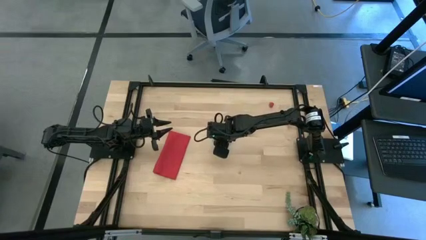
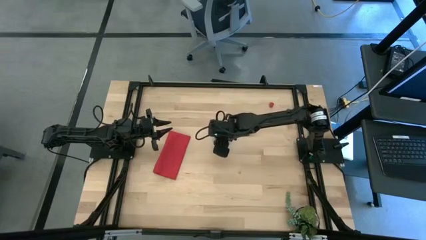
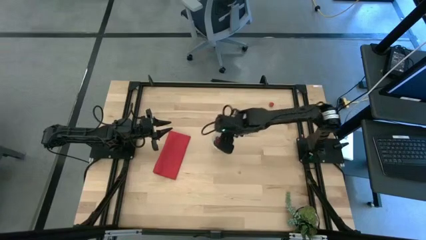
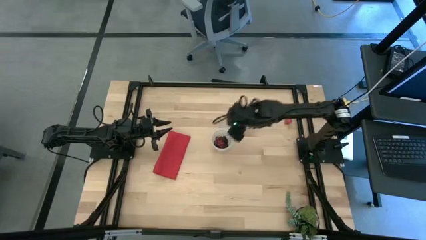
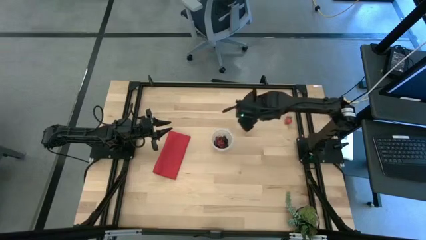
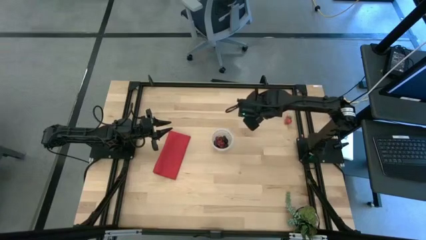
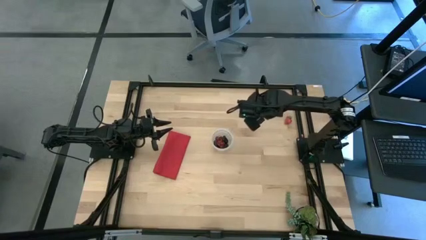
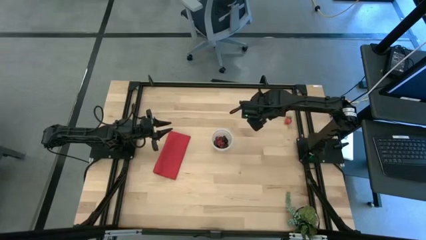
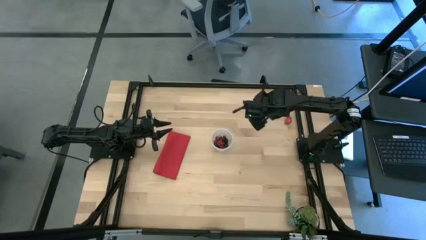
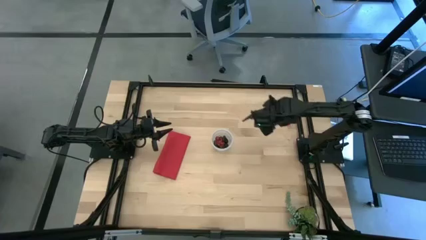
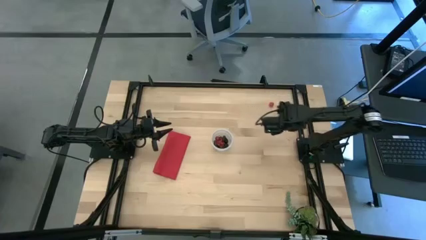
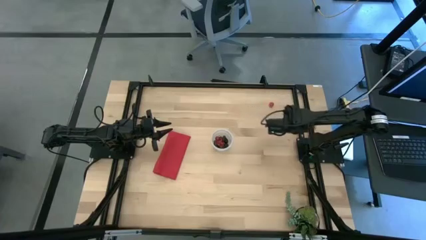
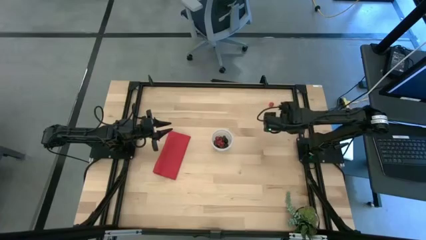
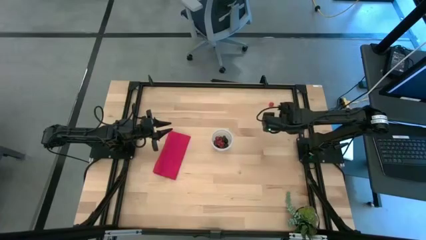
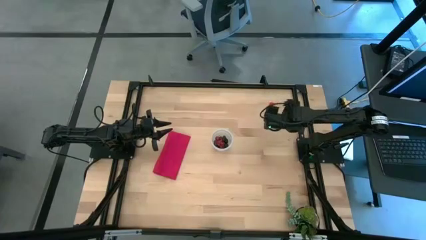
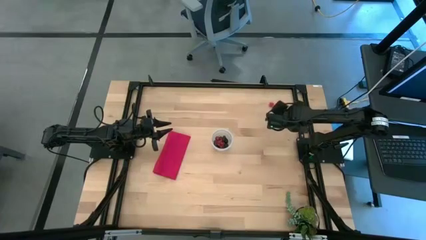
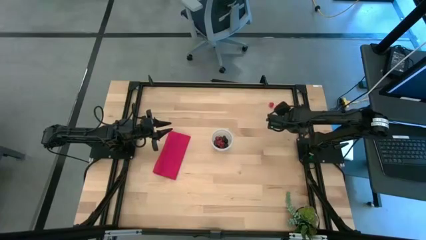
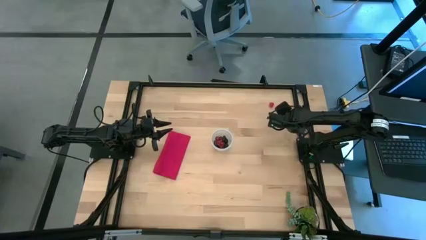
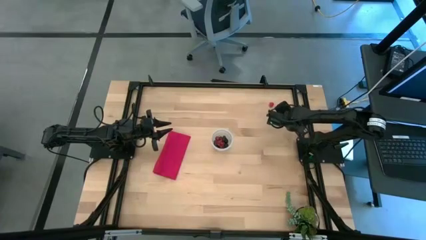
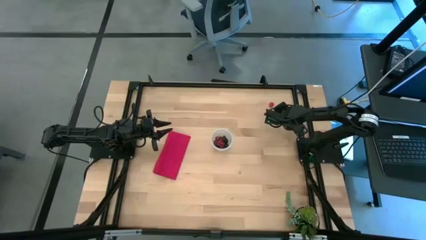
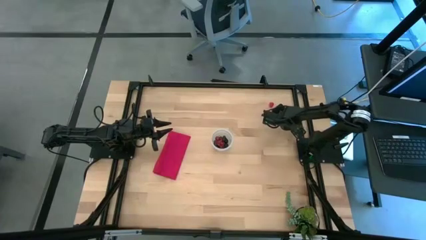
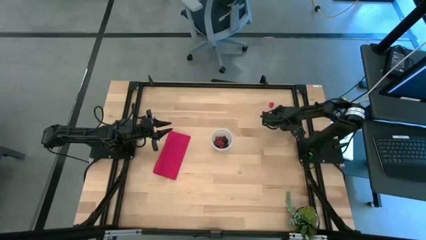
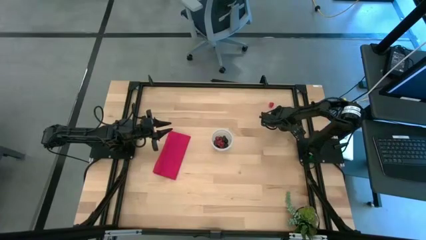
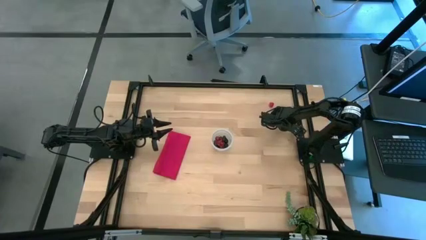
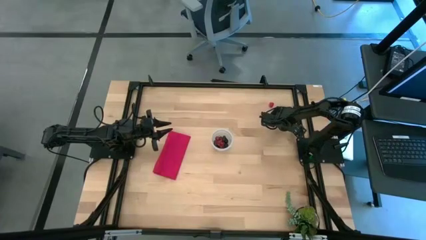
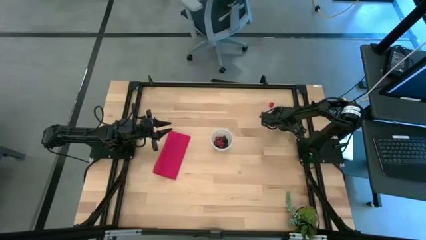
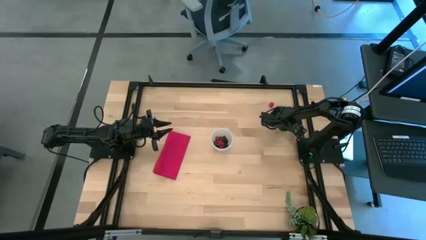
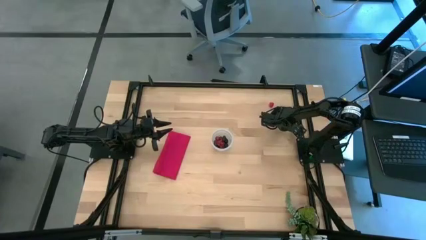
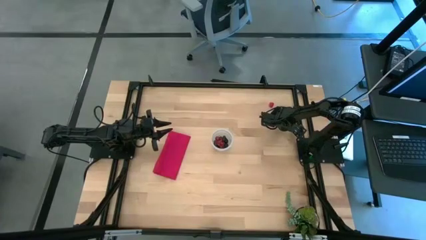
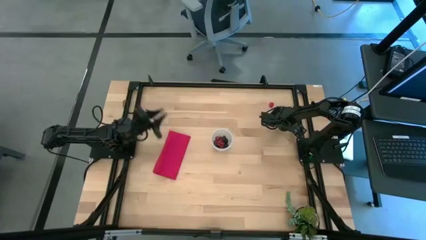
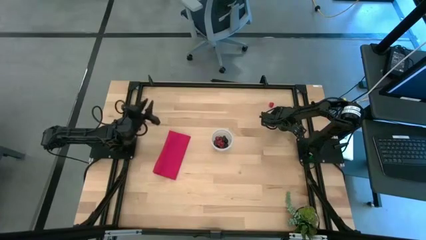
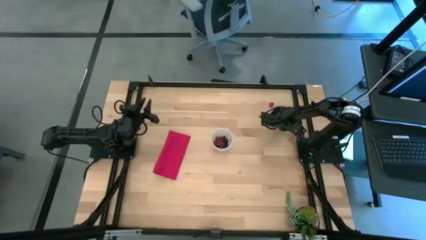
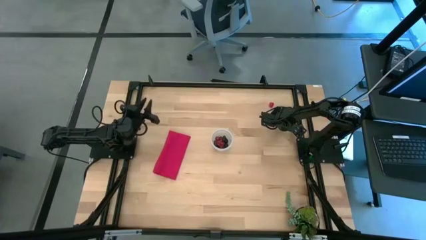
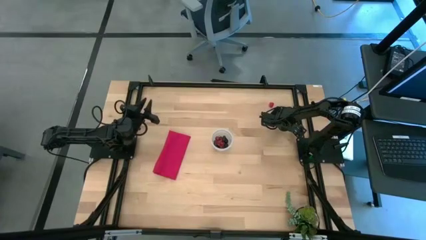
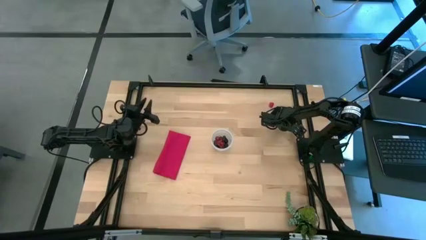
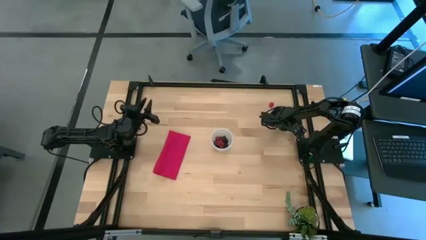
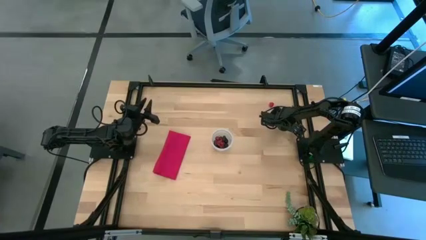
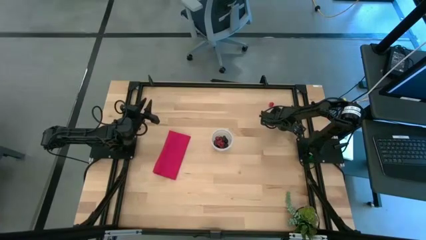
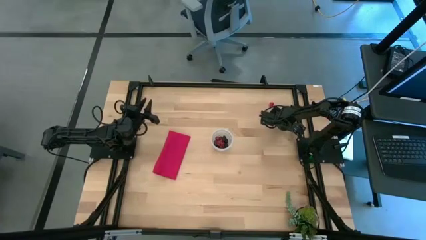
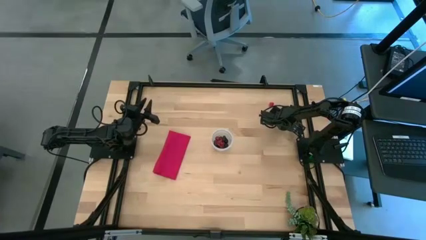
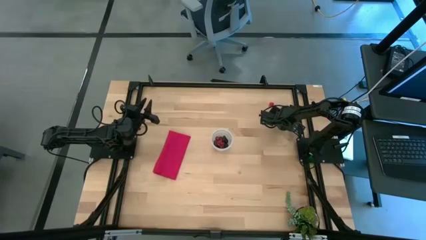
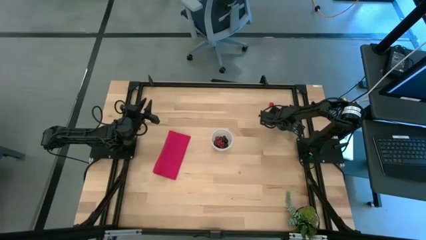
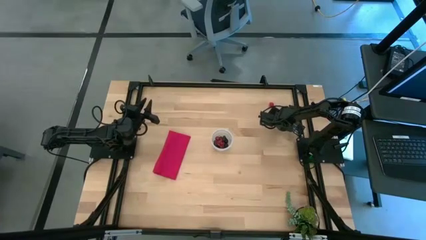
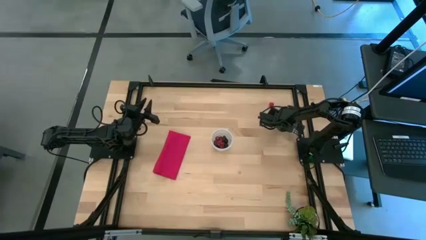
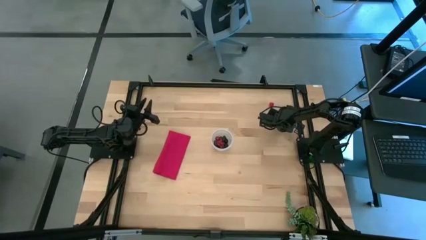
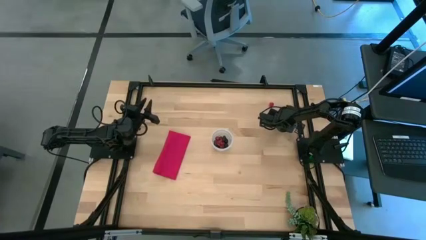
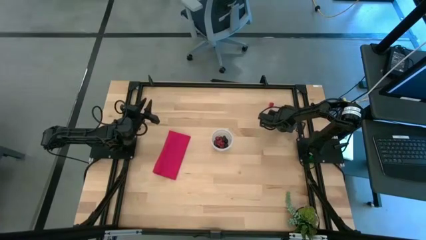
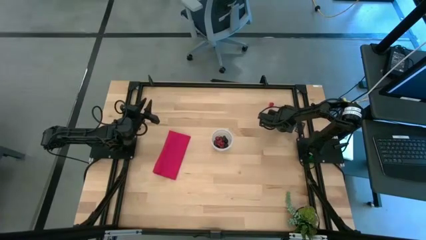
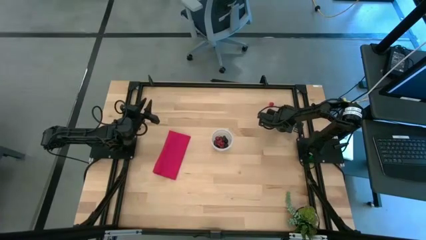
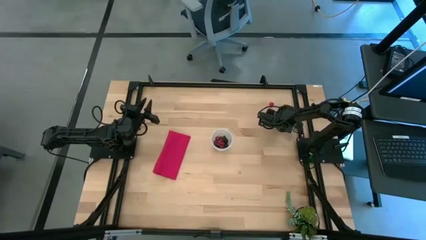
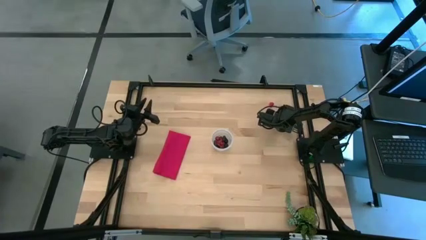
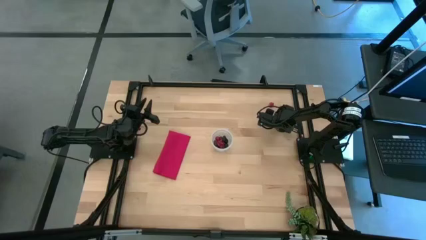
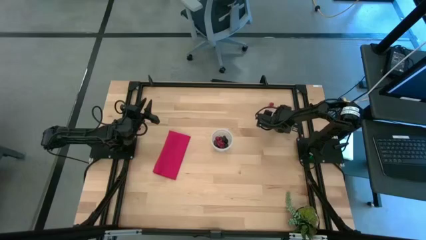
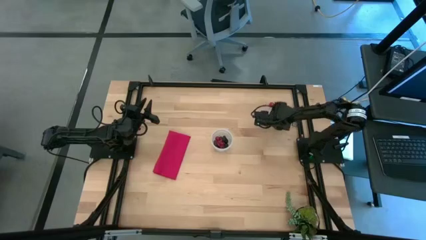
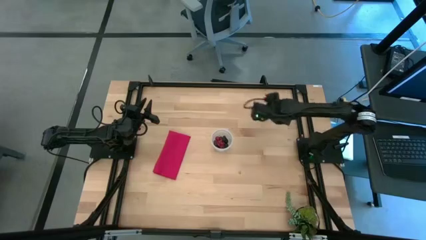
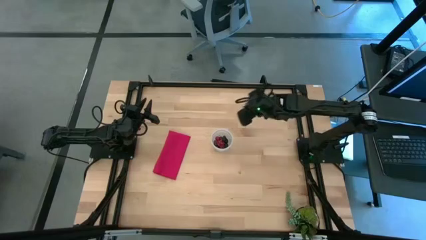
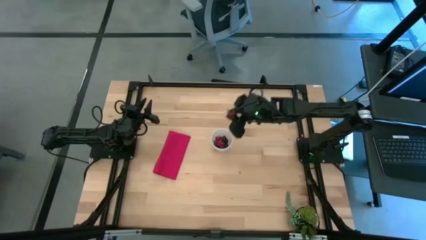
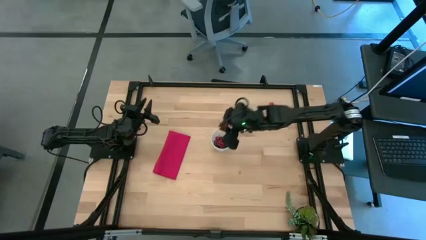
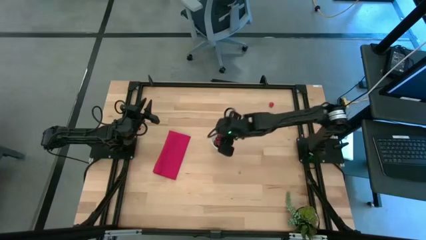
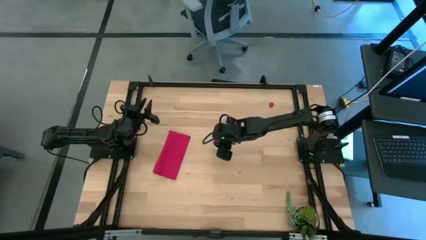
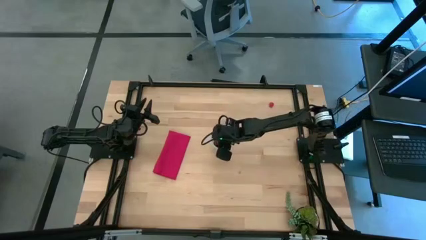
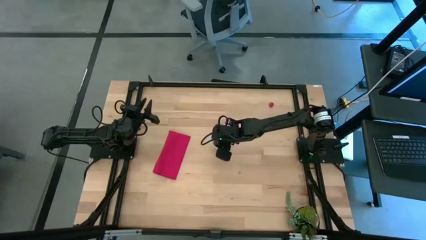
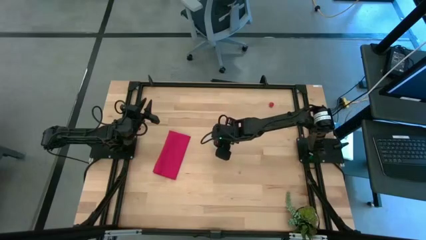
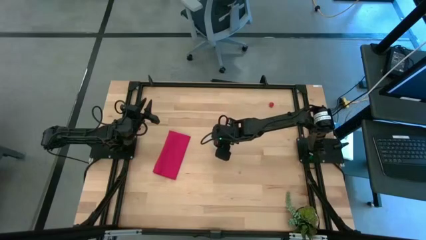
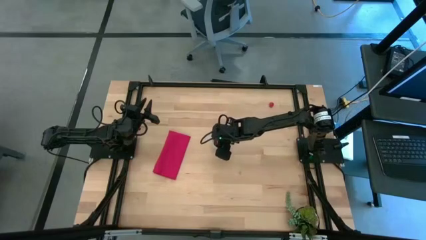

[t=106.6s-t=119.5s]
Task: Pick and placing Produce into tupperware
Put the strawberries into the transparent bin

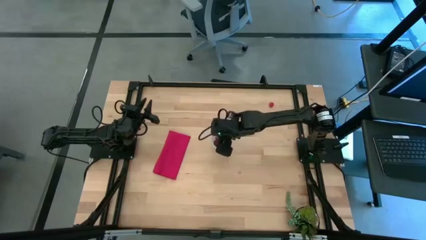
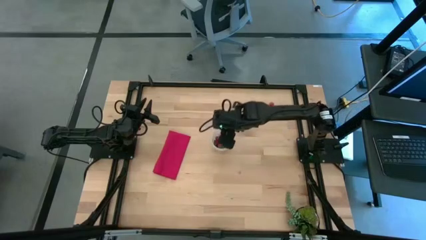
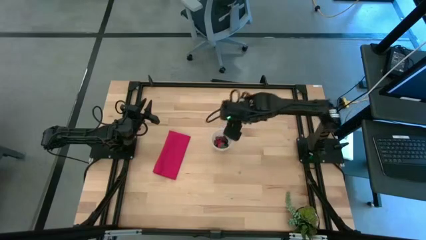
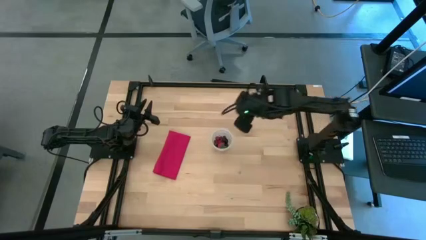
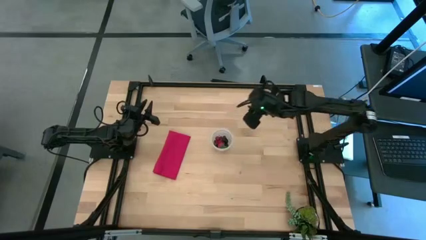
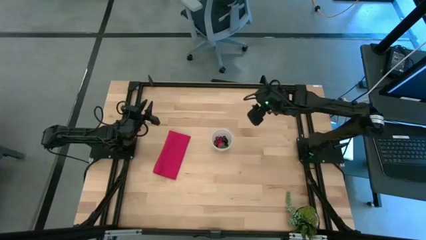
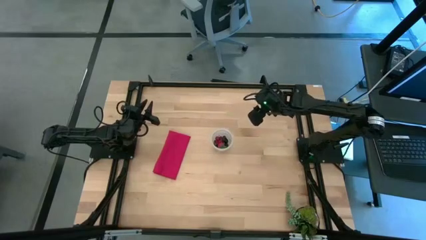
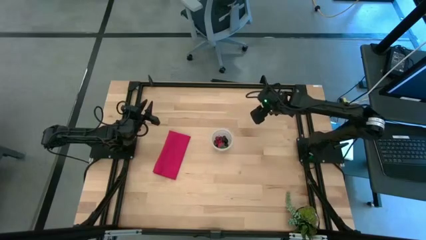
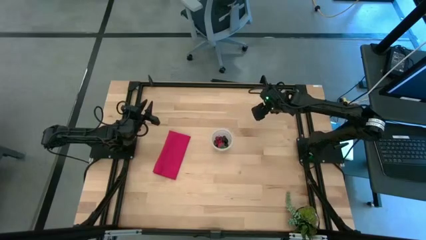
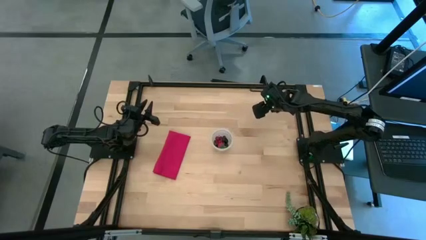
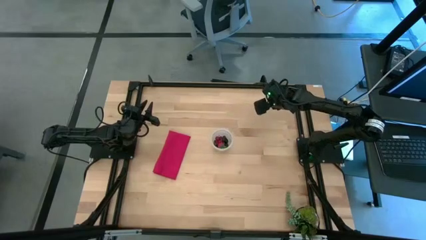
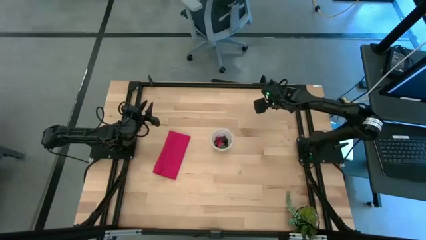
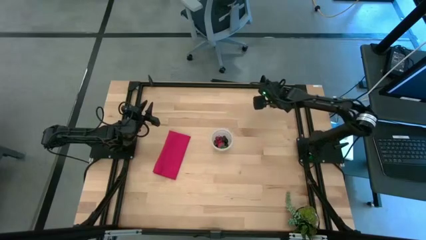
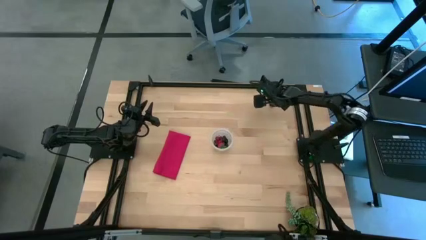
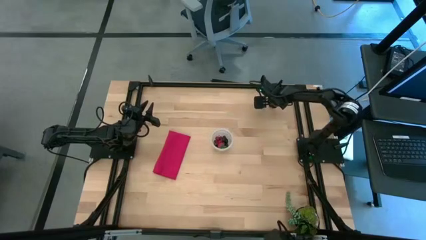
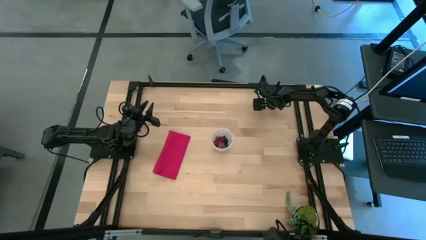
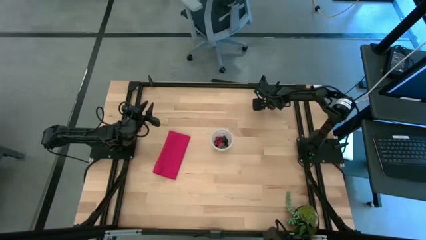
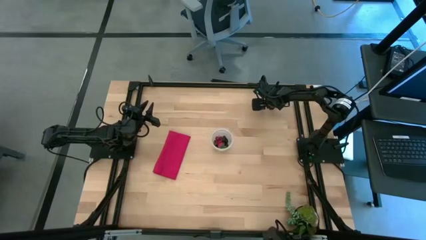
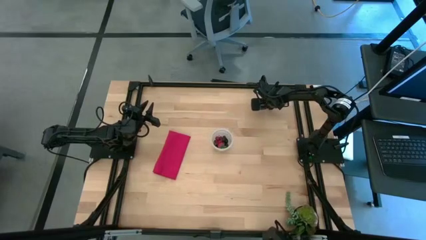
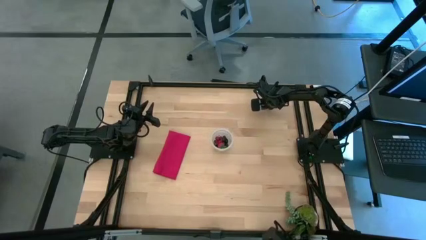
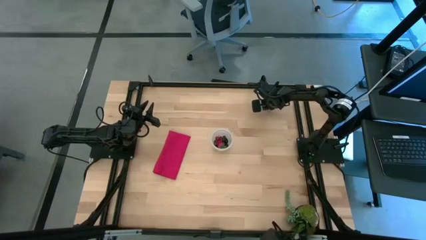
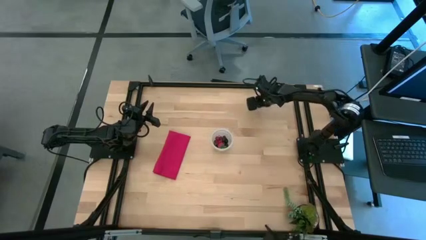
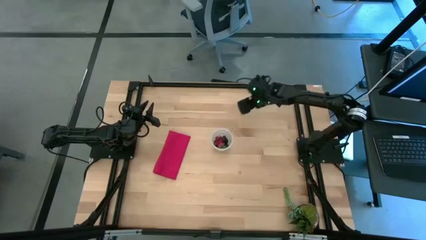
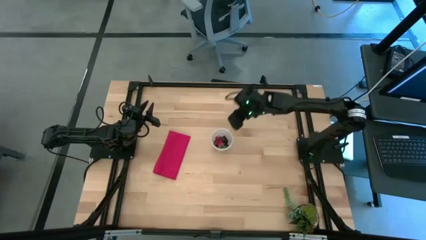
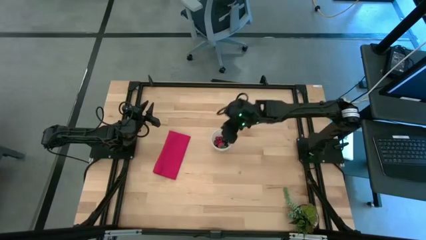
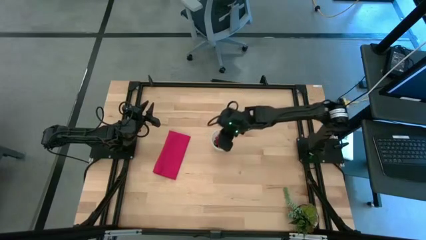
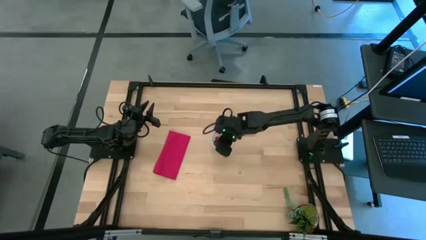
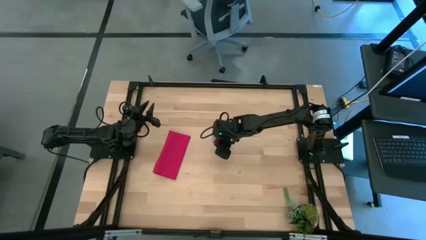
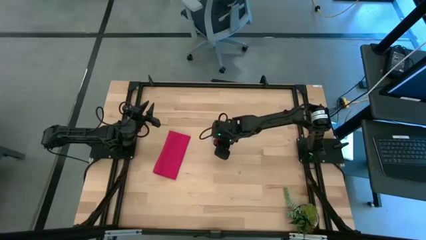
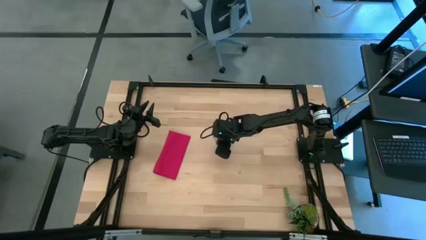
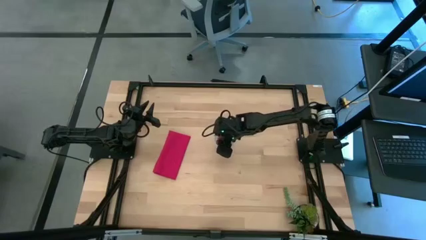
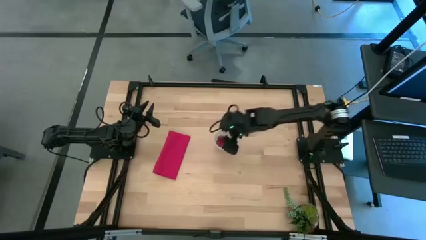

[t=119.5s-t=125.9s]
Put the raspberries into the transparent bin
